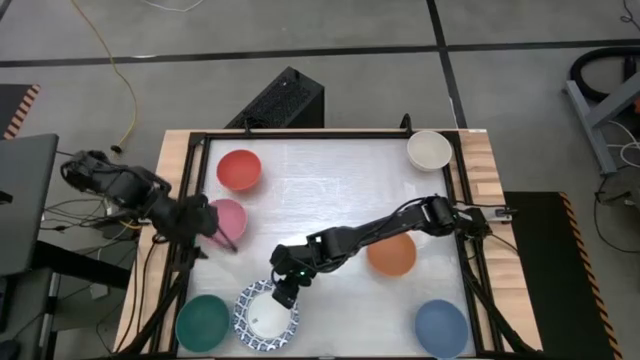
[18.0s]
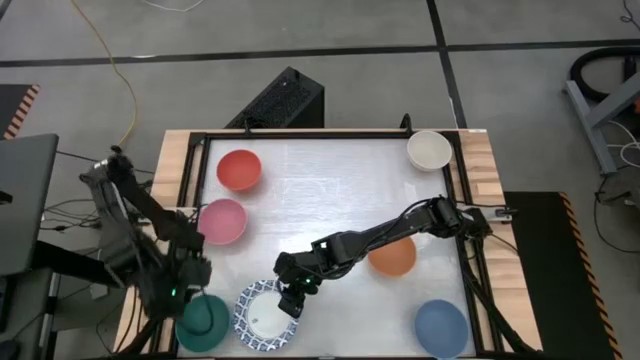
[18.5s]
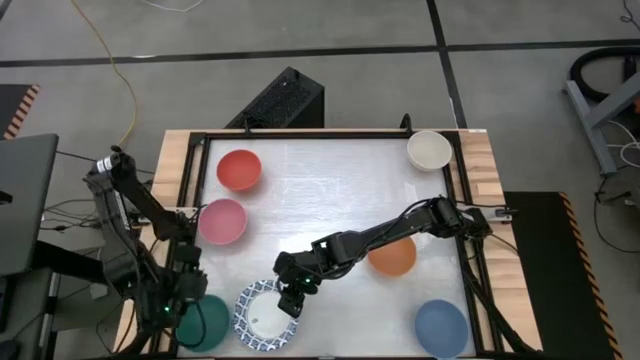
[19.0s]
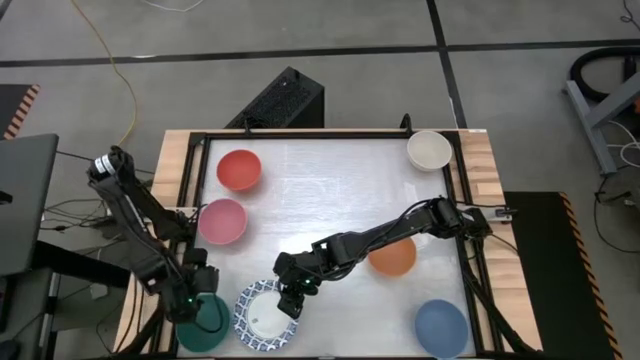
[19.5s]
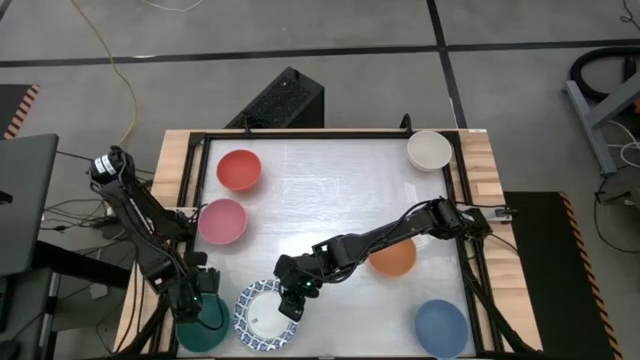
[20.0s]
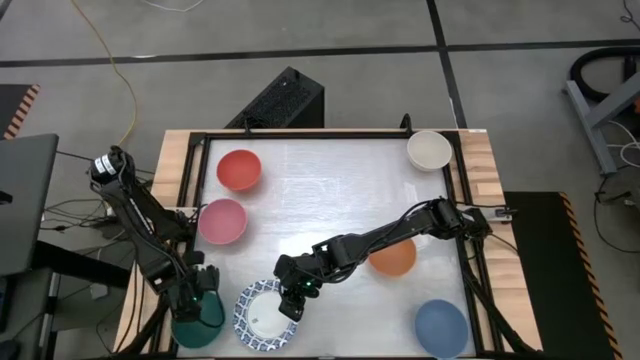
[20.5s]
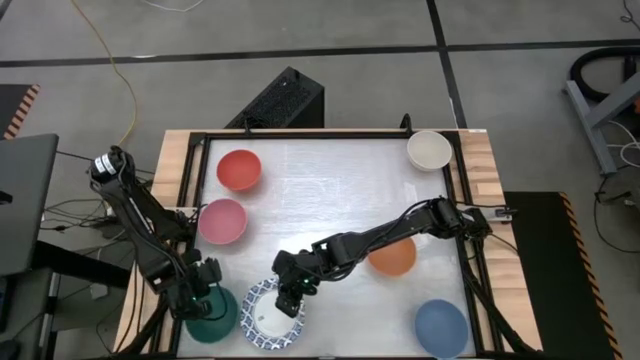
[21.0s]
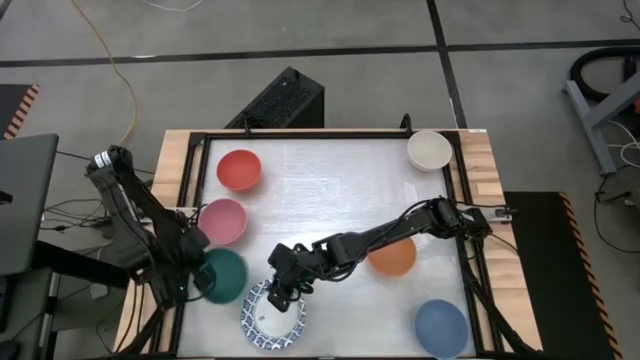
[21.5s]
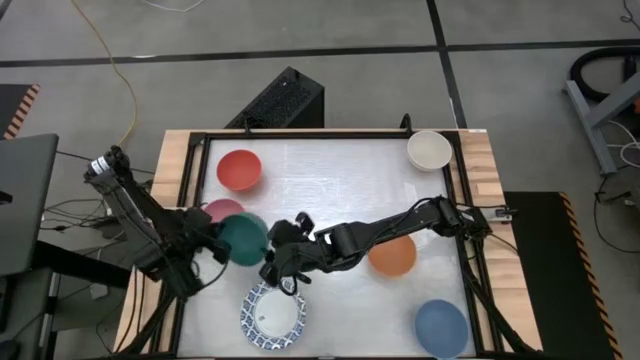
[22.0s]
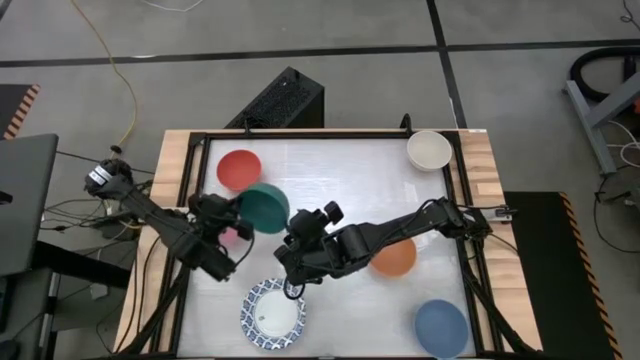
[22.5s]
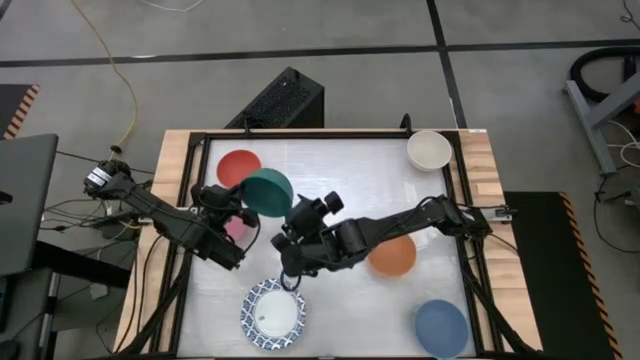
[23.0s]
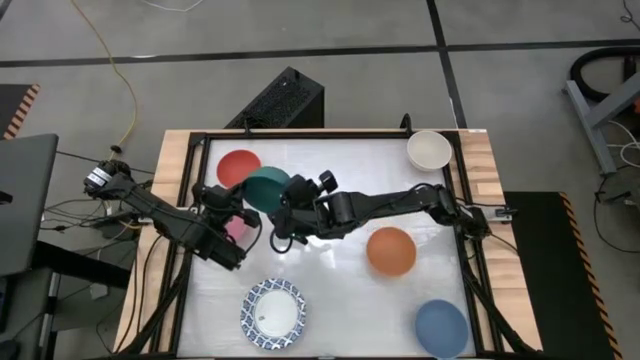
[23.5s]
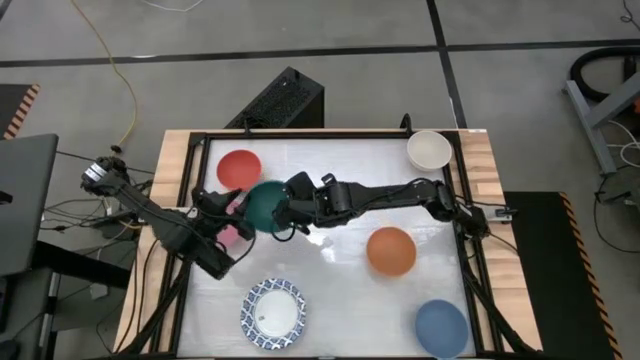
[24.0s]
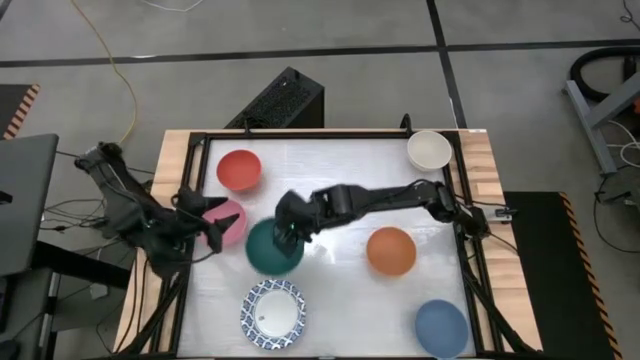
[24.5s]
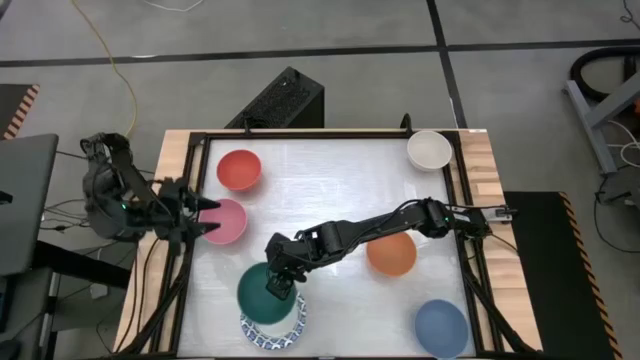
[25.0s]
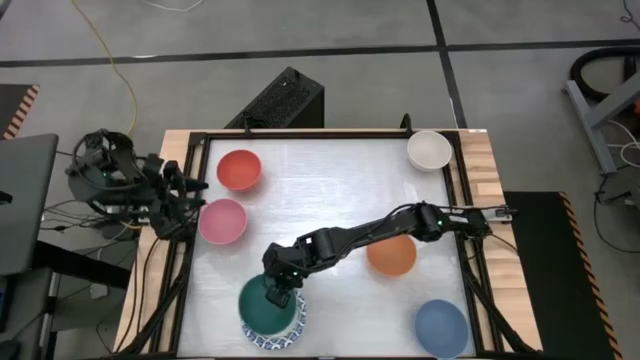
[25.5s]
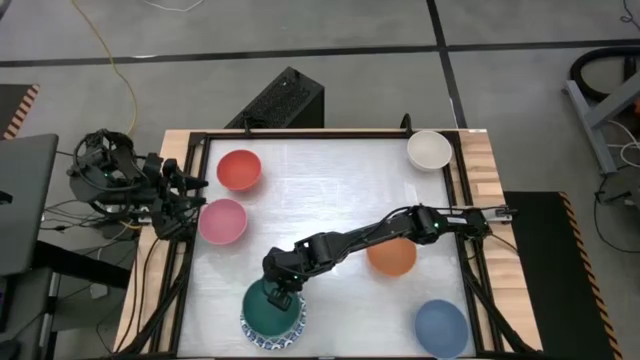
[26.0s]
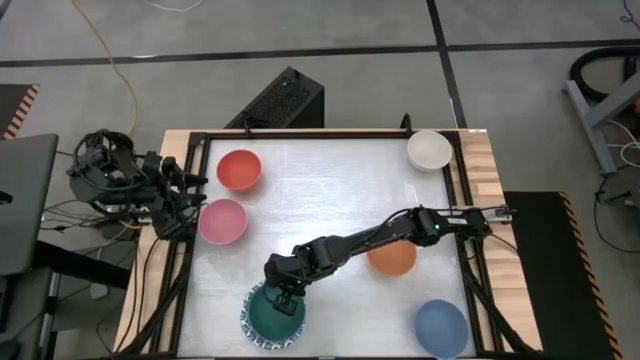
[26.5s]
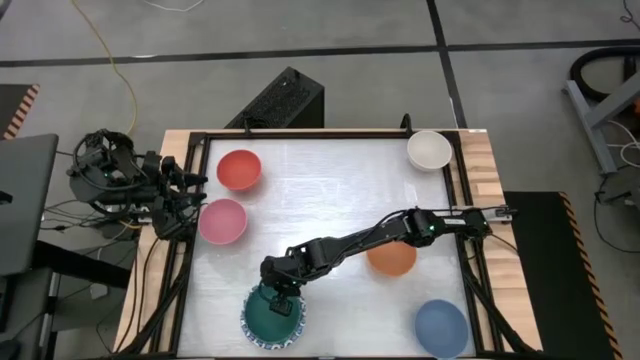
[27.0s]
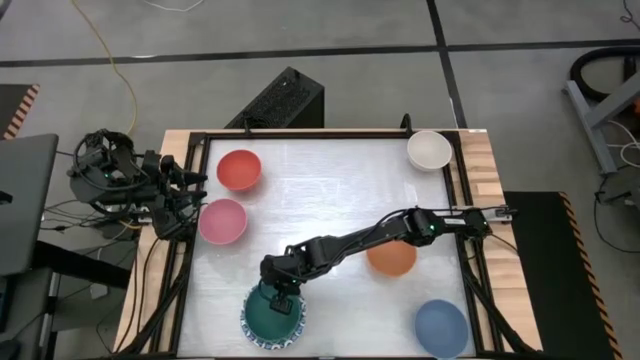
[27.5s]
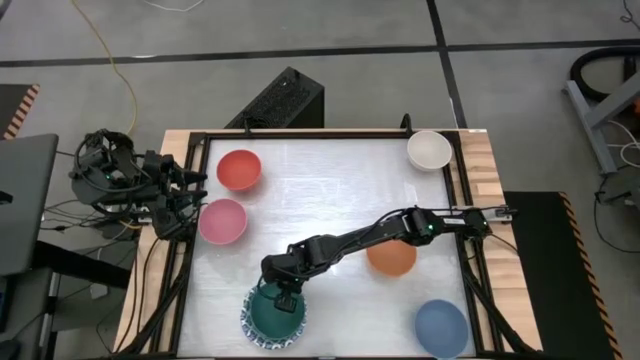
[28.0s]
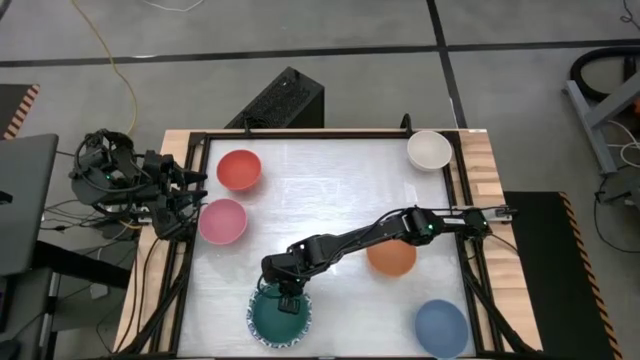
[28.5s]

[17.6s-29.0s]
Stack the green bowl on top of the striped bowl

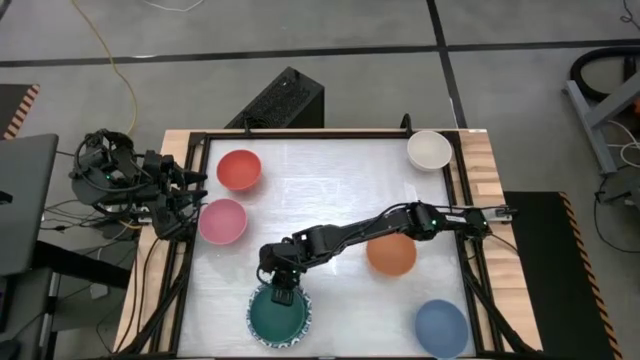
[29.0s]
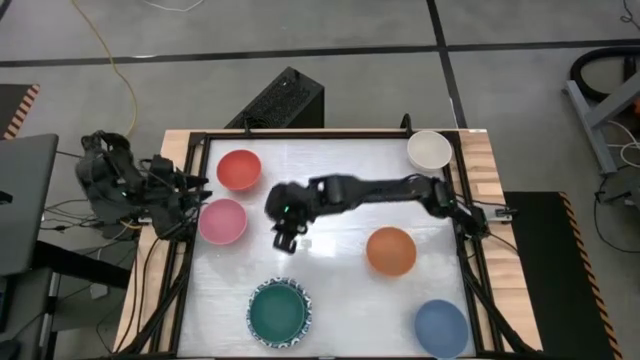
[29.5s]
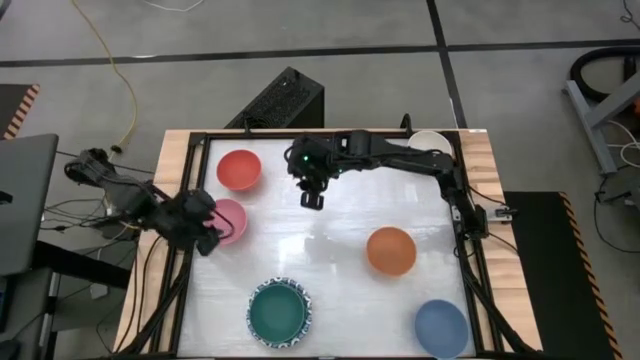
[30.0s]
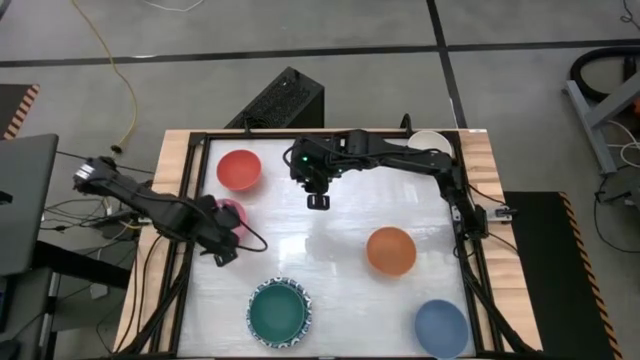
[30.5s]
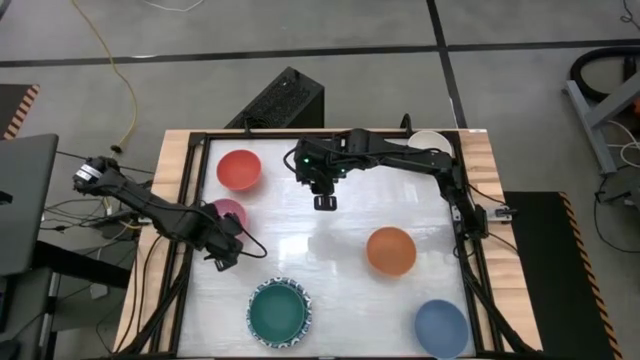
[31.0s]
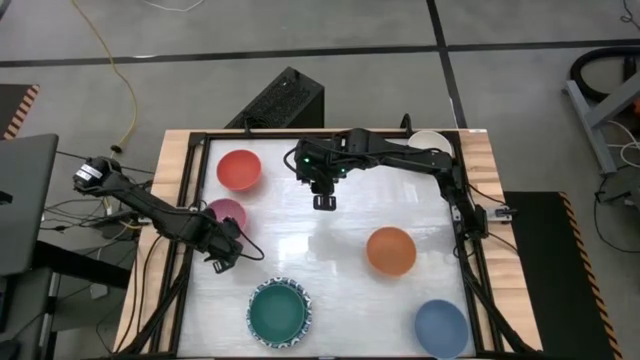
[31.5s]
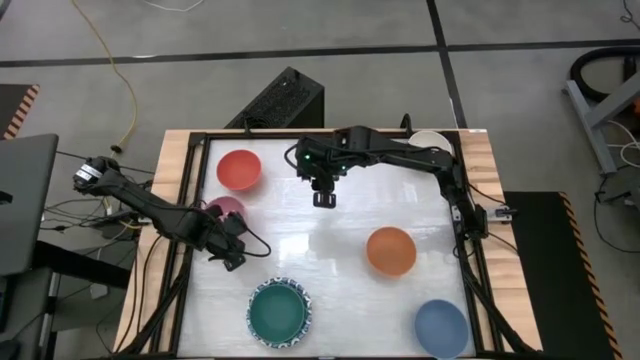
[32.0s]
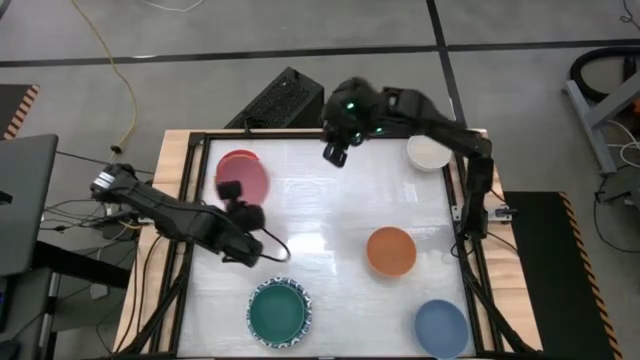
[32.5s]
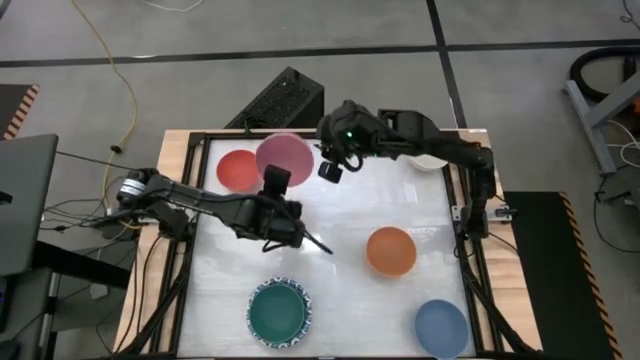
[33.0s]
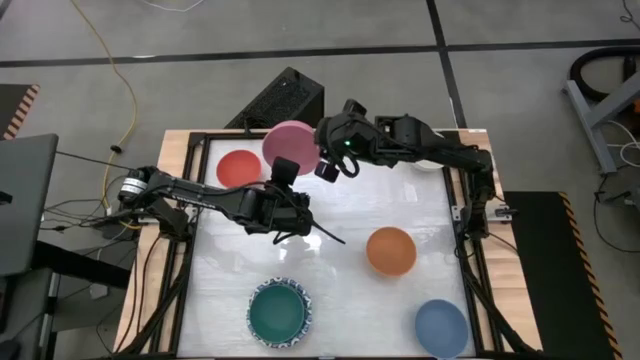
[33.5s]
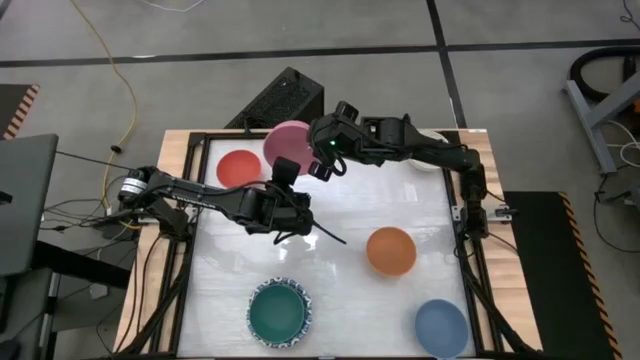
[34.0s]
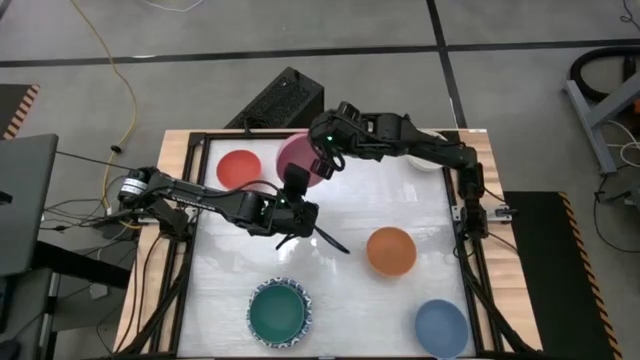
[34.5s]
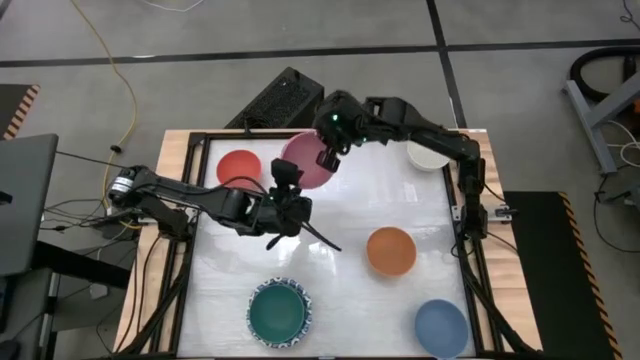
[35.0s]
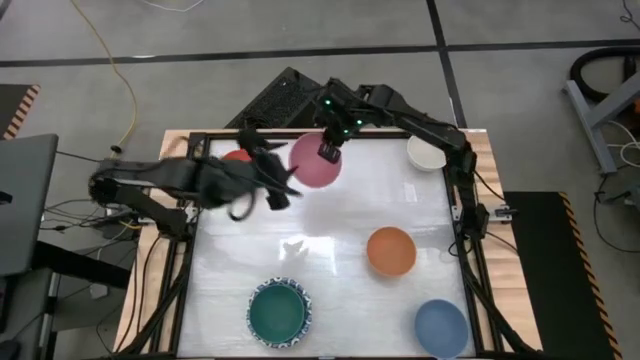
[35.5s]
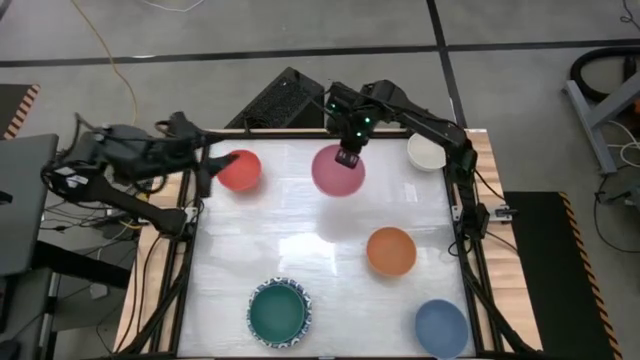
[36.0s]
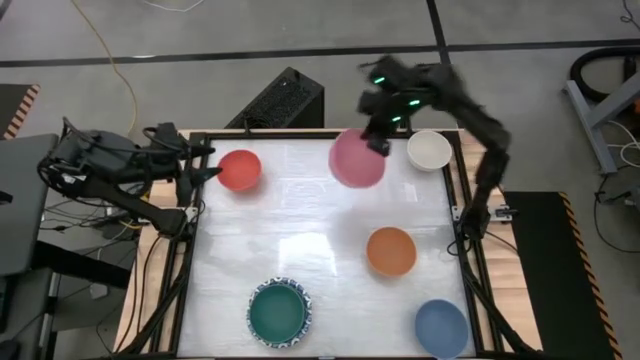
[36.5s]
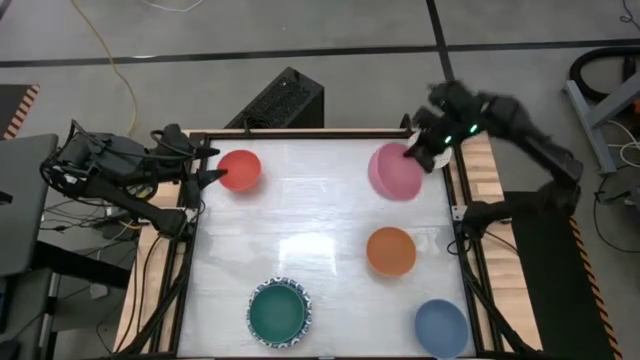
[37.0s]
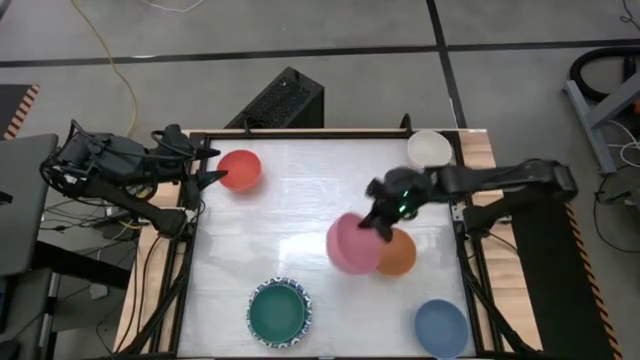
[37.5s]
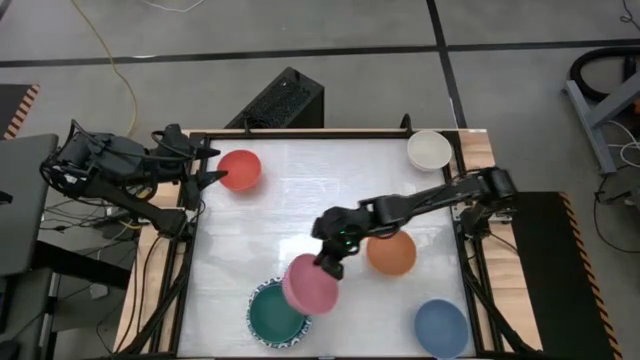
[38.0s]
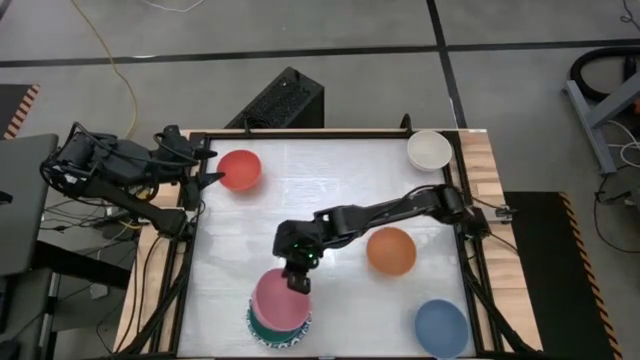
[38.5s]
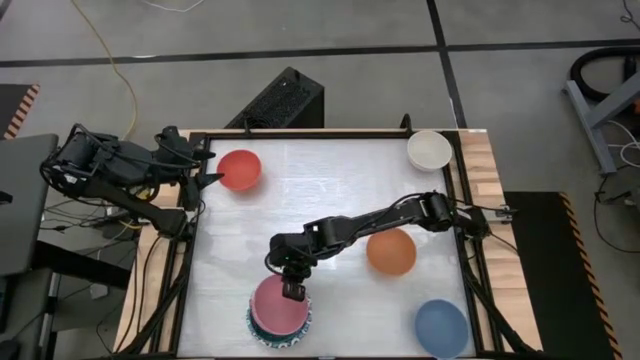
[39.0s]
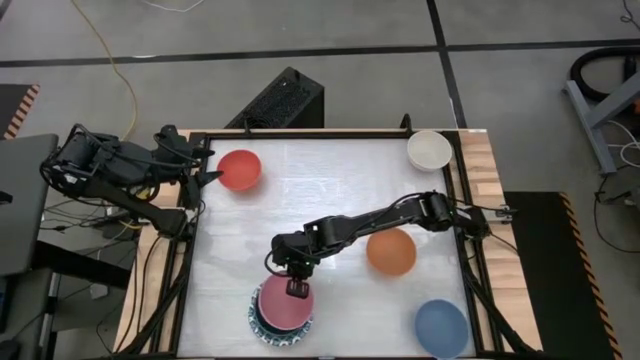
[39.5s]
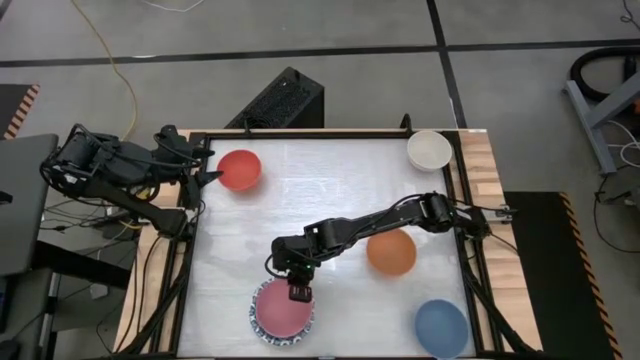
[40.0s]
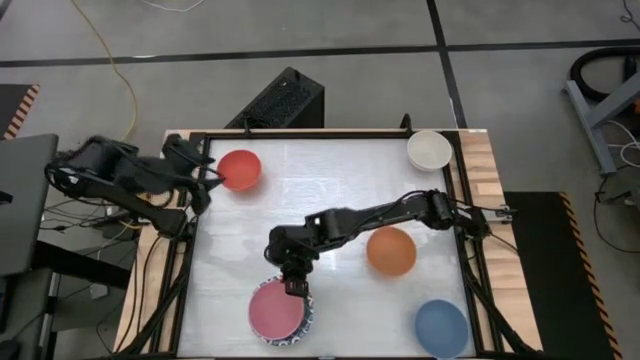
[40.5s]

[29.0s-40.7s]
Stack the pink bowl on top of the green bowl
